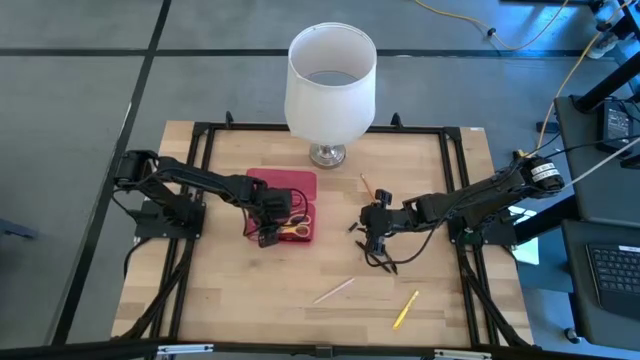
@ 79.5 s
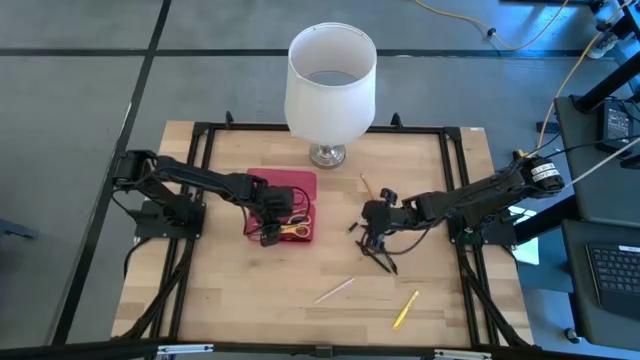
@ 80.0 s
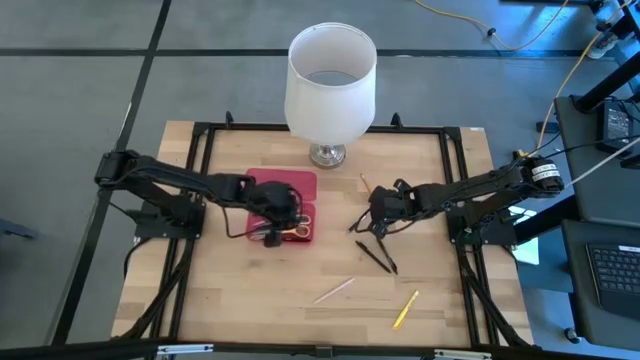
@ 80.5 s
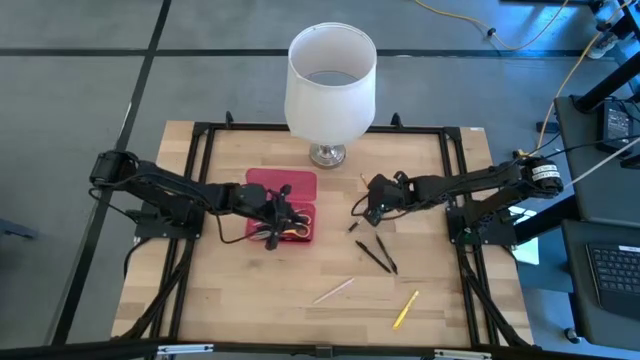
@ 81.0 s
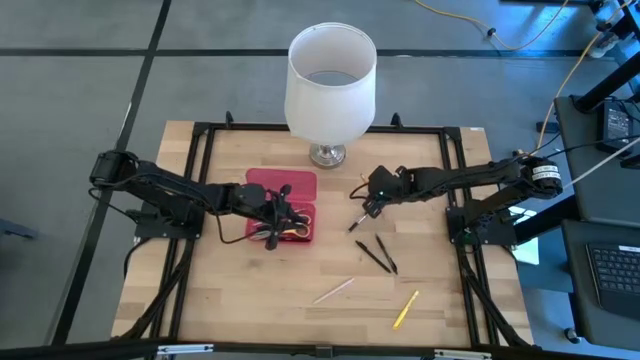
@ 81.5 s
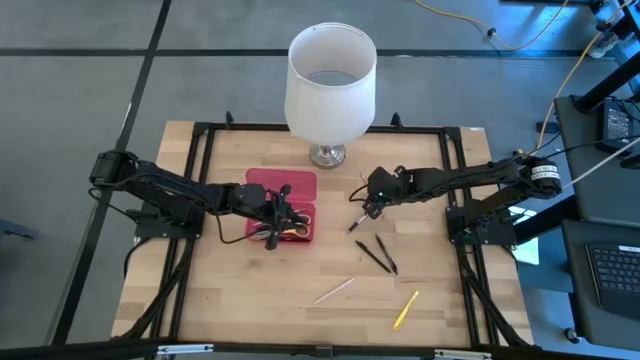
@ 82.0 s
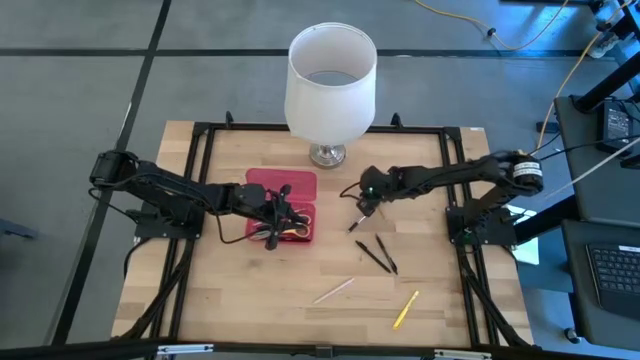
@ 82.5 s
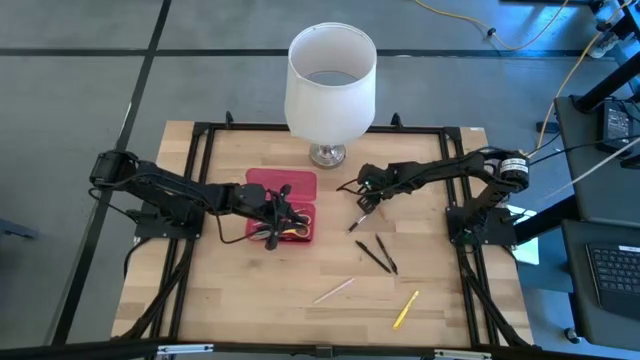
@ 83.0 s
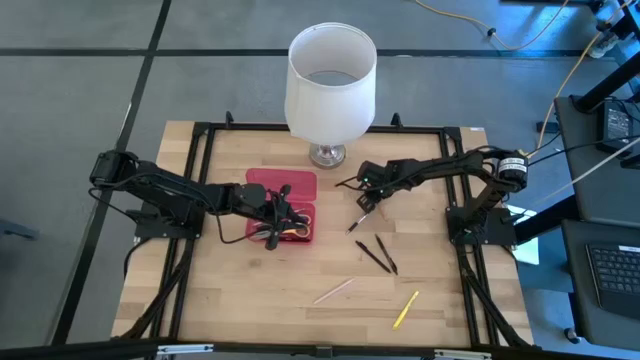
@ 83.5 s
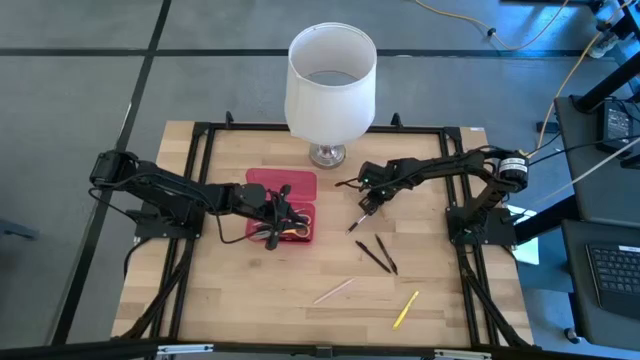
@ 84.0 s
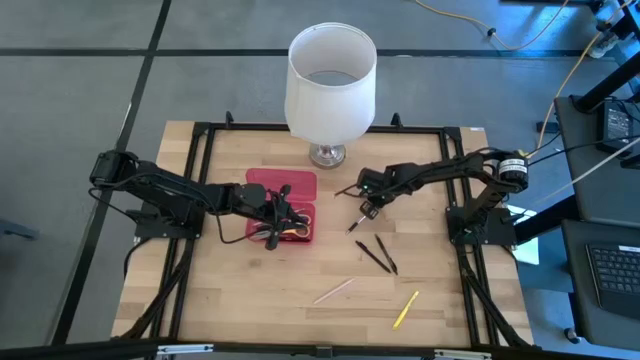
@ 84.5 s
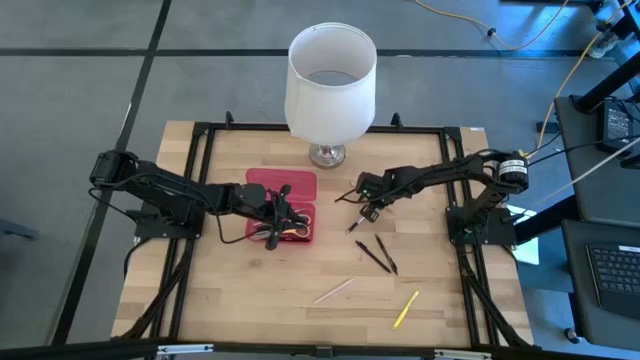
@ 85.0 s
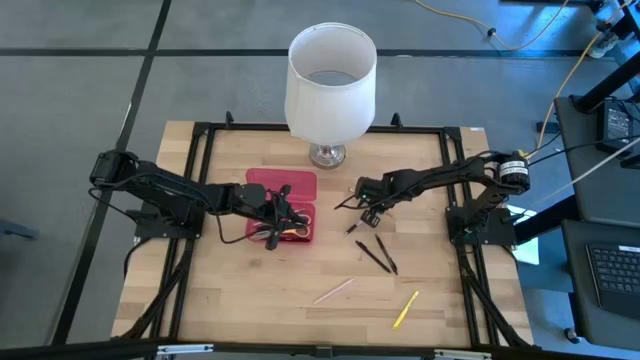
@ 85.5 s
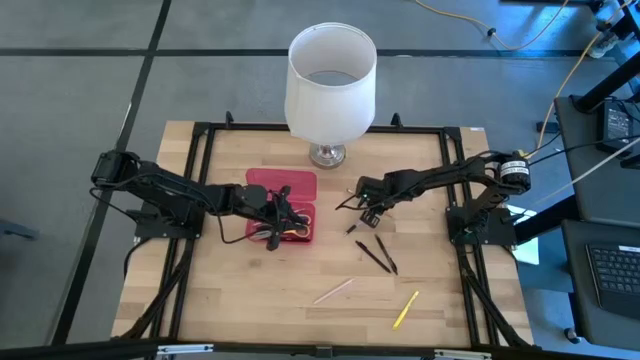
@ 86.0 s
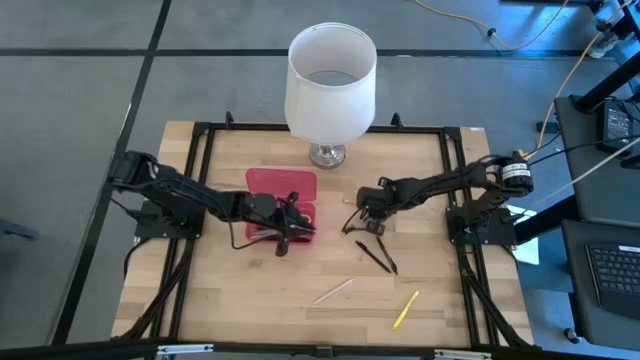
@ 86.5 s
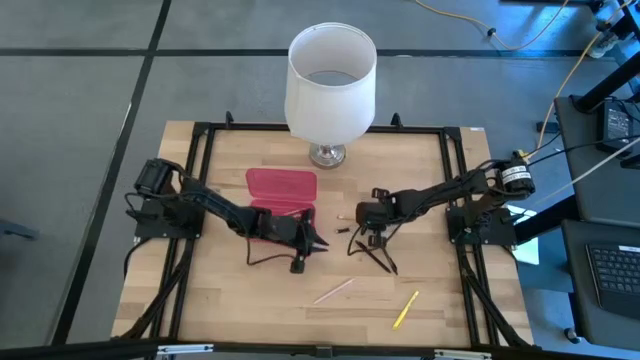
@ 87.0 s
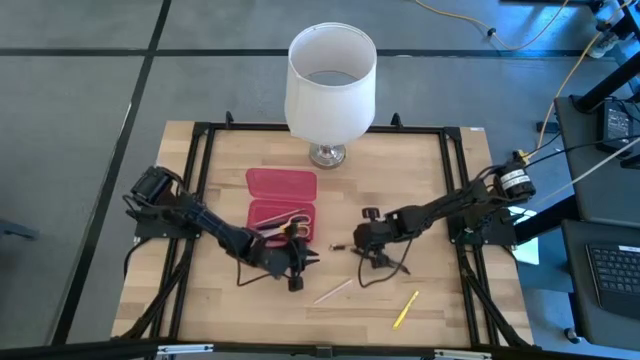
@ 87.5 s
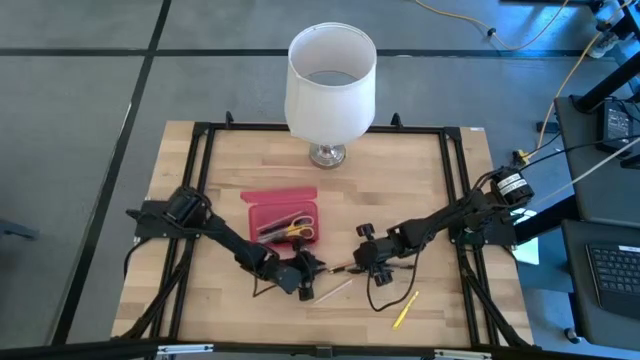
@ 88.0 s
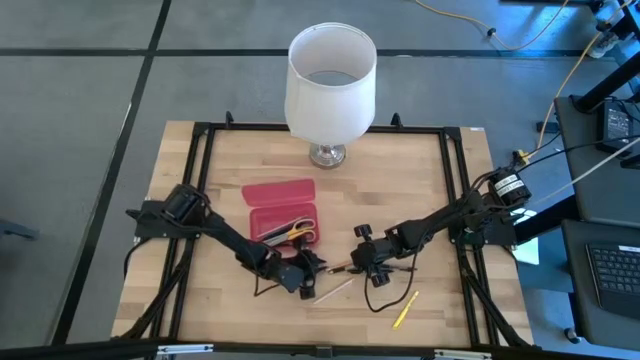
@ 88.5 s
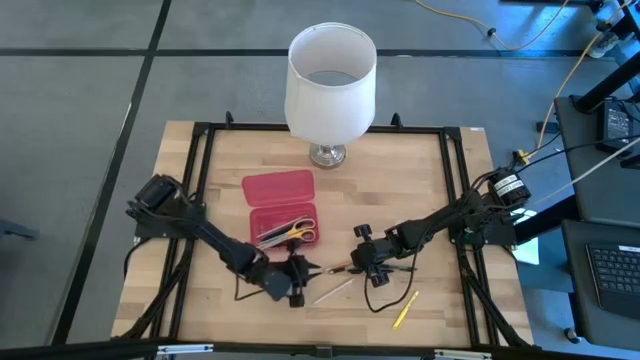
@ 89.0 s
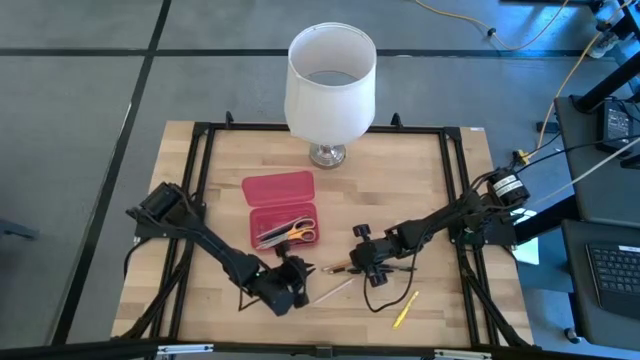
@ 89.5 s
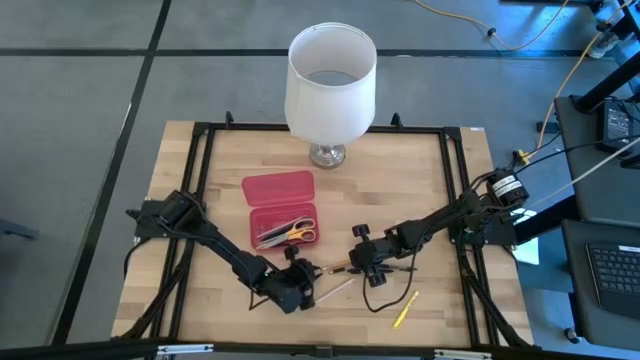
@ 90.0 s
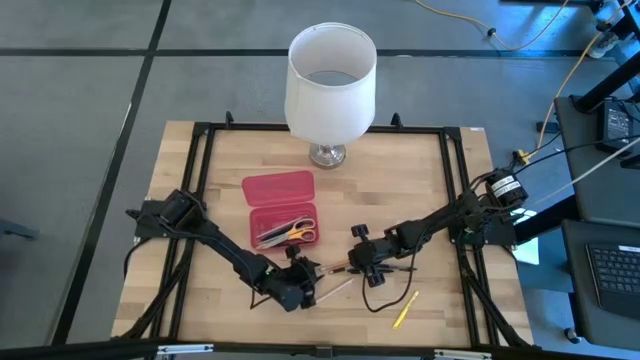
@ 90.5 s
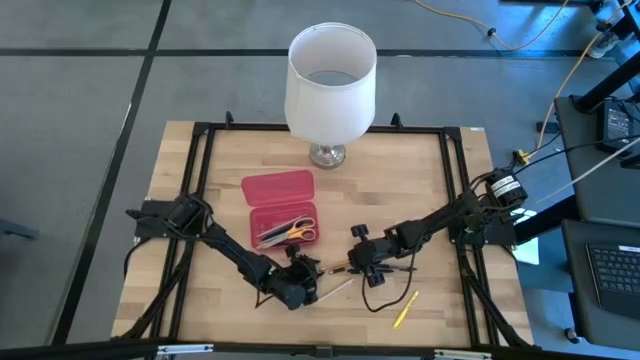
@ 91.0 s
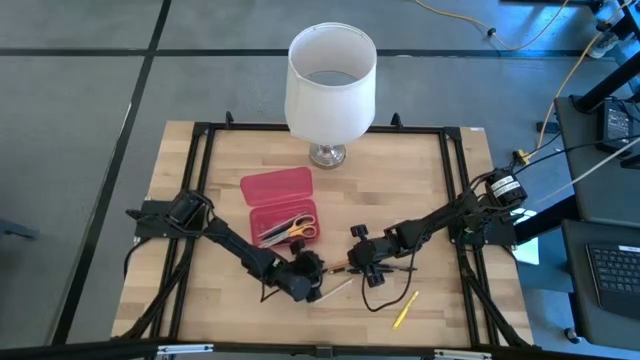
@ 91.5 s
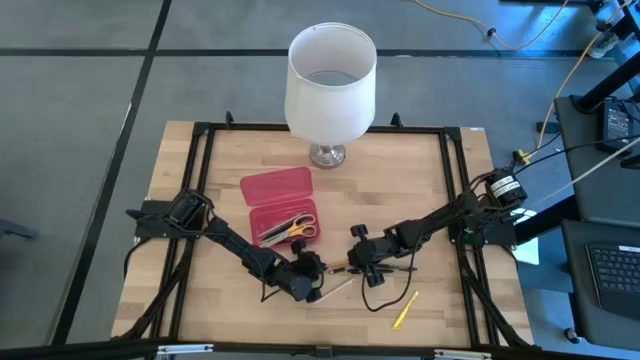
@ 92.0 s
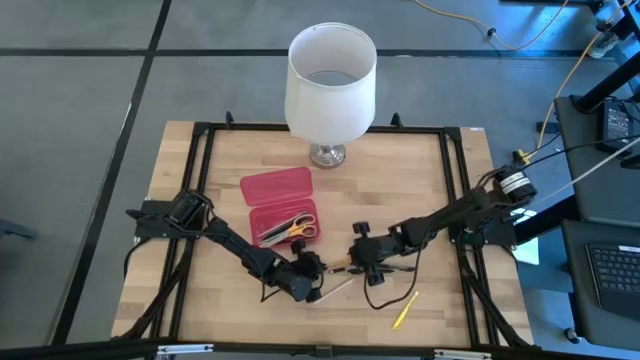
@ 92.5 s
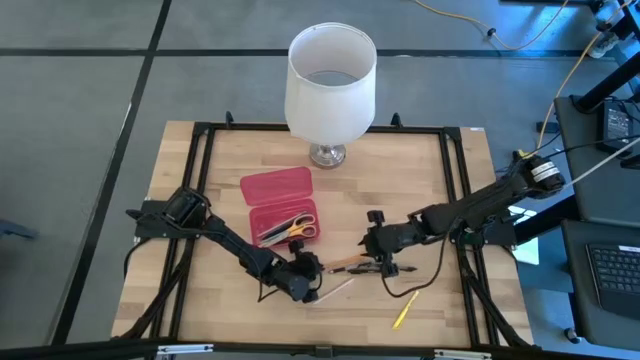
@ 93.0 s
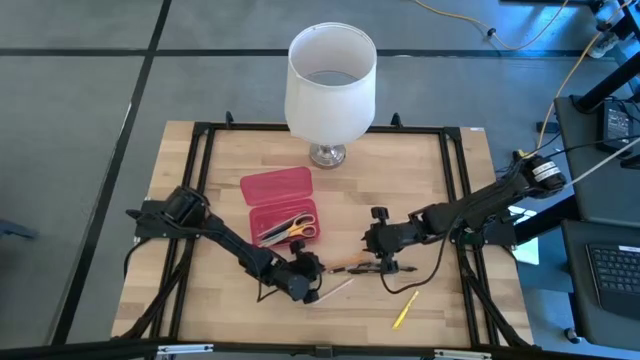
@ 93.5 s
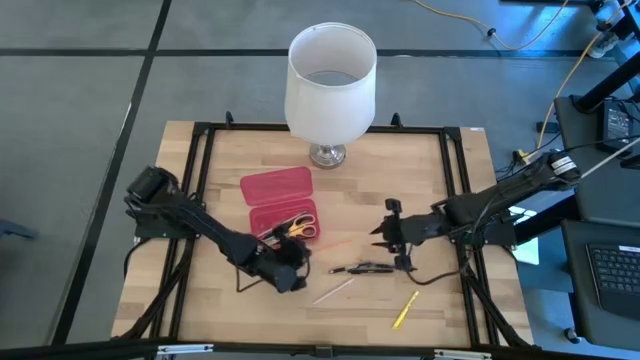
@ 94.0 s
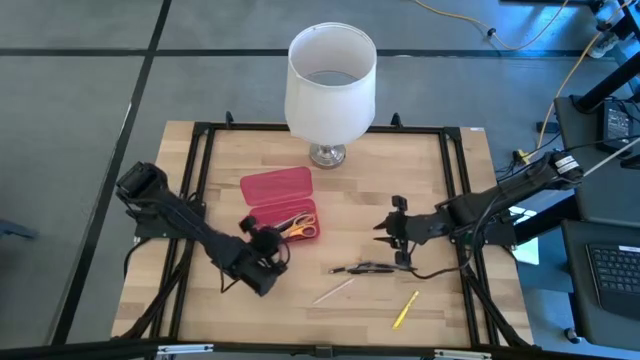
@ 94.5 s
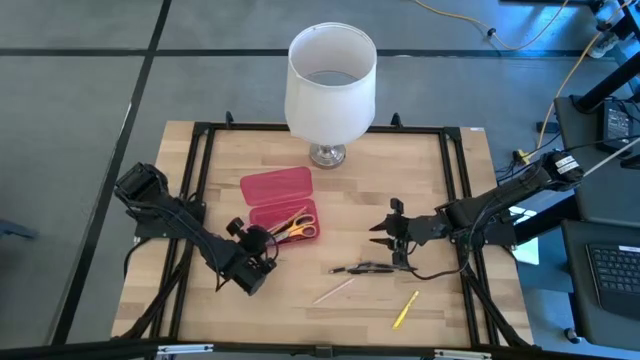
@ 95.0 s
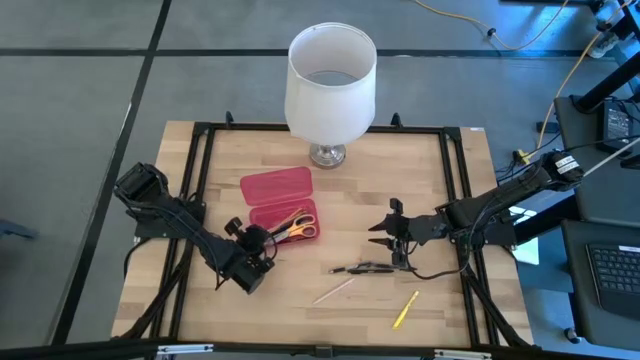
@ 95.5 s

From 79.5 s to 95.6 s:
Task: Pick & place school supplies into a supply box
Put the yellow pencil into the red supply box

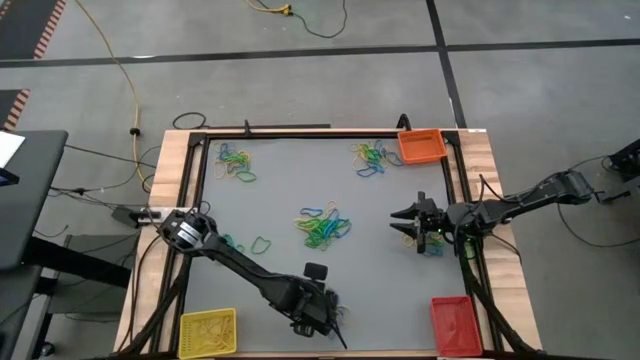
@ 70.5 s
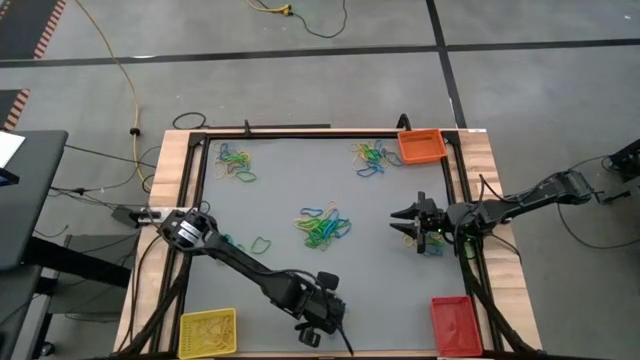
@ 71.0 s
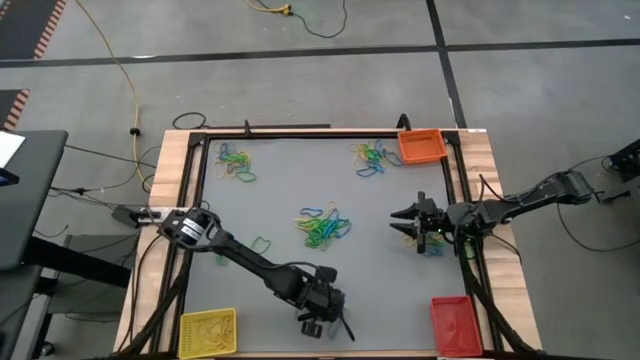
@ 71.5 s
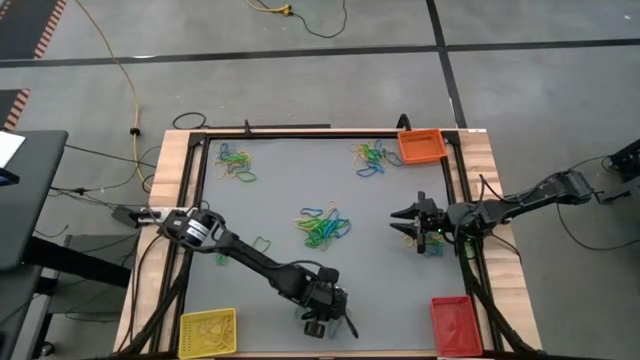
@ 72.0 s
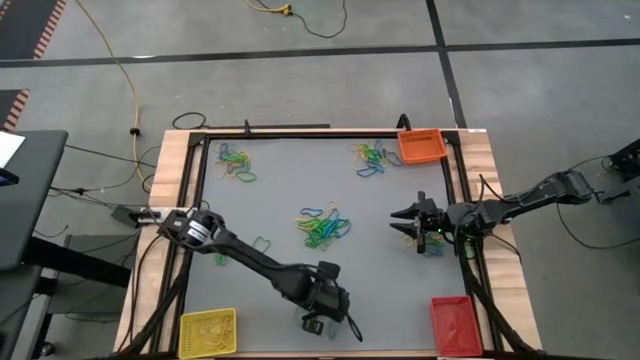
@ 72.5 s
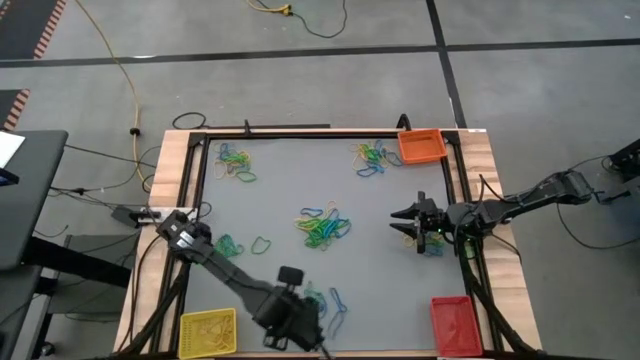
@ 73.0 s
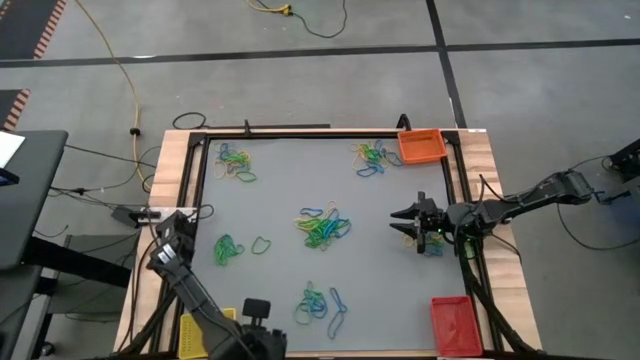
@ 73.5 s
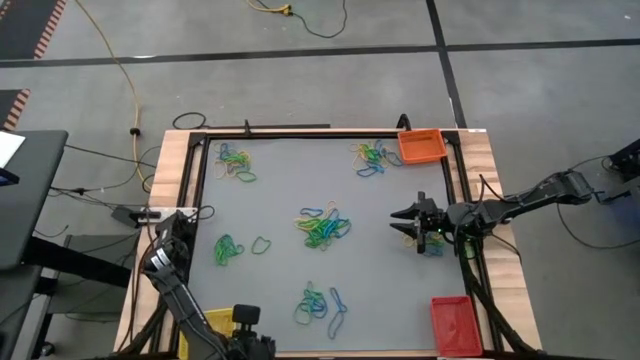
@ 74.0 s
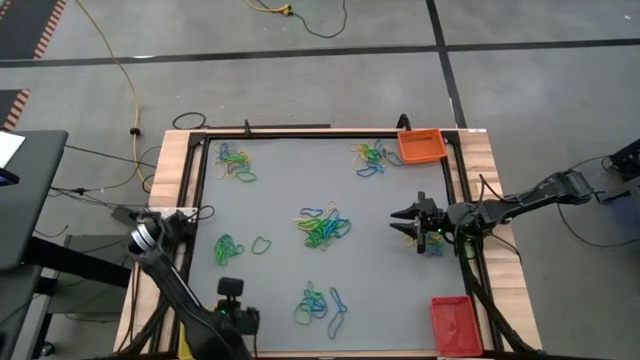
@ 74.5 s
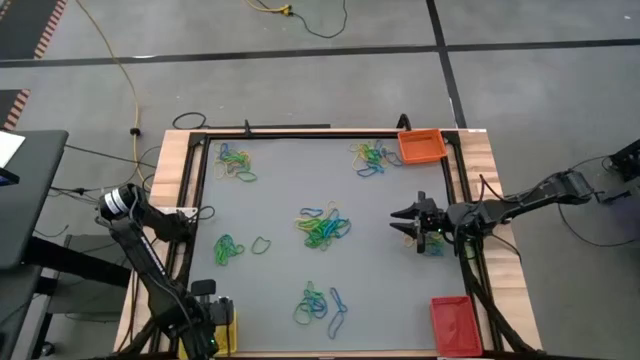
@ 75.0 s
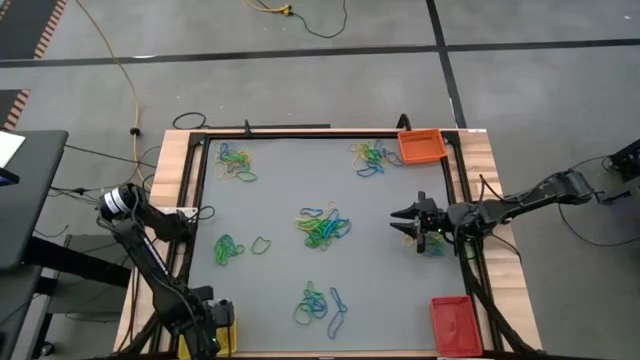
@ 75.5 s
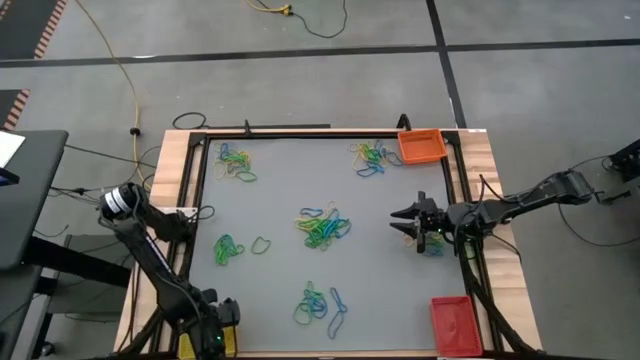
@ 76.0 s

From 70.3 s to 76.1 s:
Task: Sort rubber bands into baskets
Put the yellow rubber band into the yellow bin
